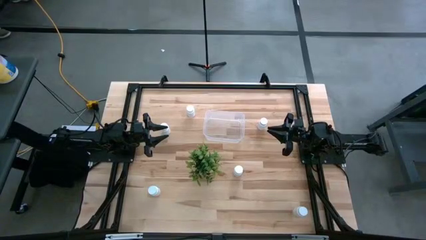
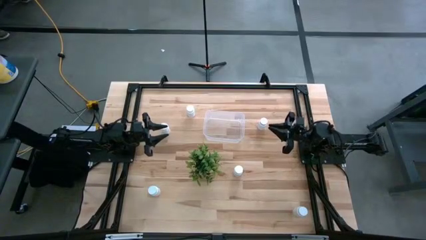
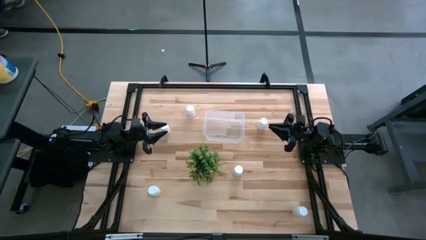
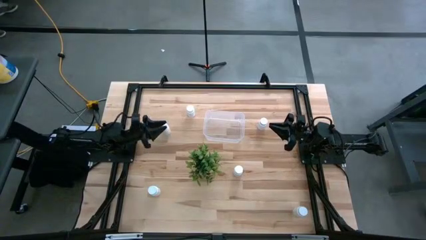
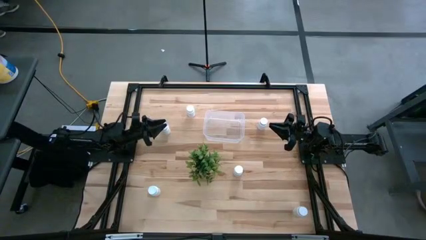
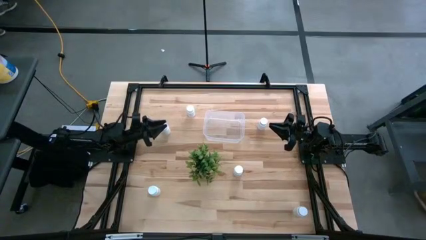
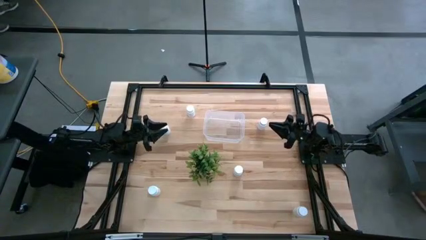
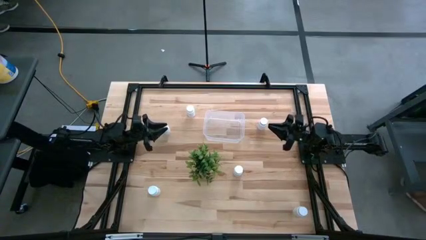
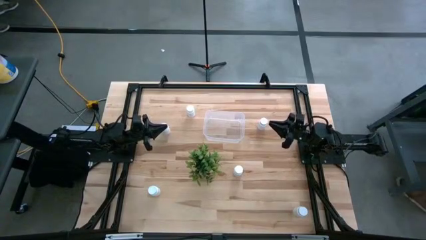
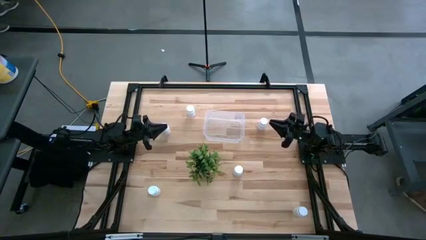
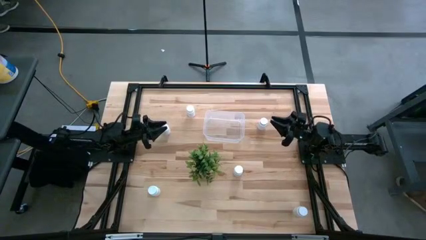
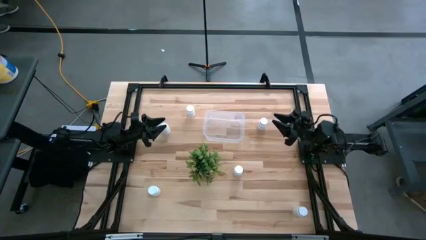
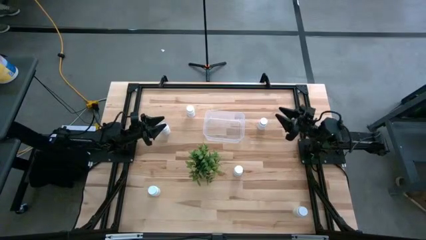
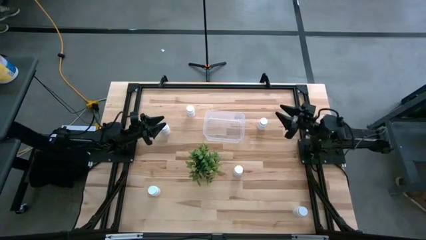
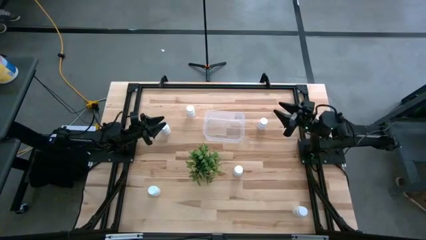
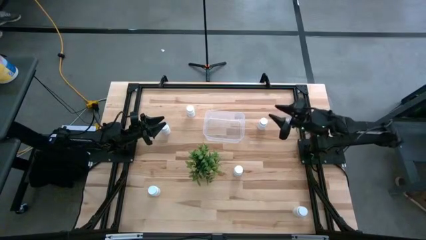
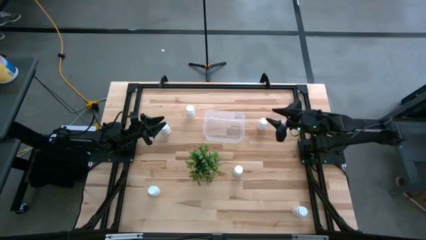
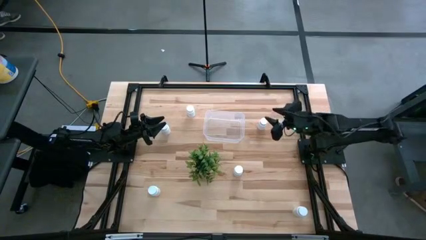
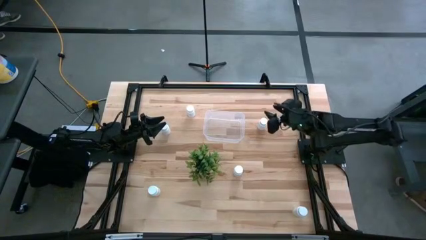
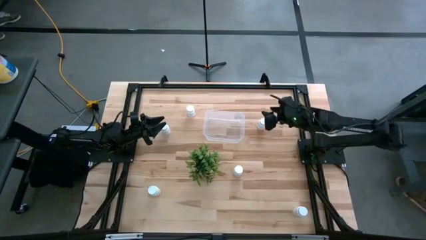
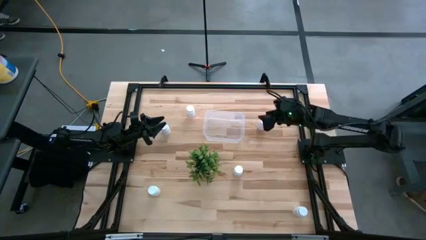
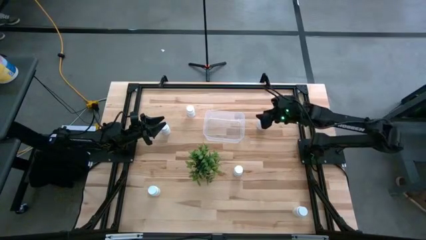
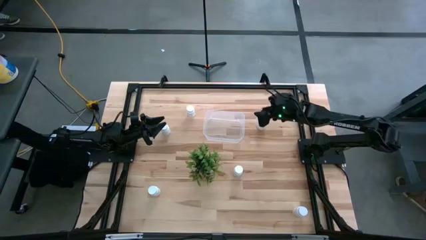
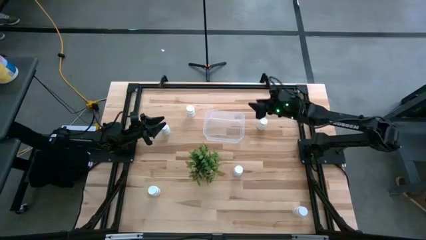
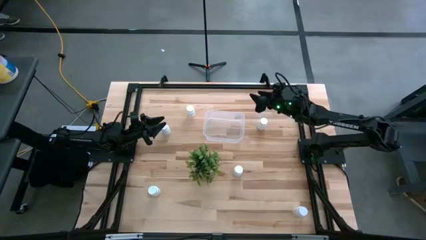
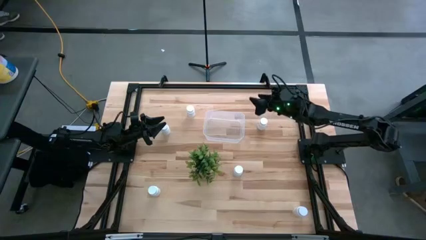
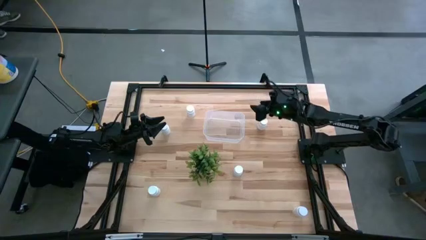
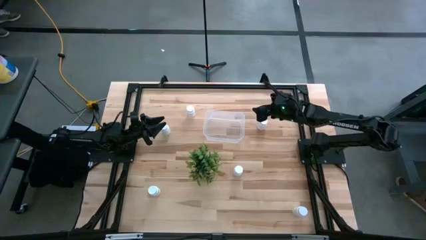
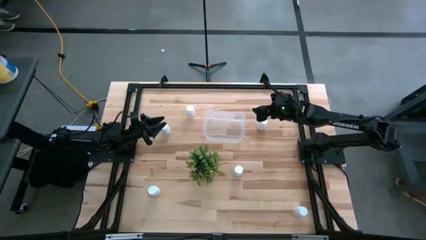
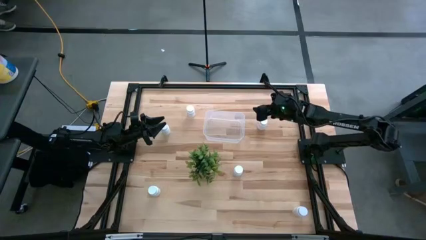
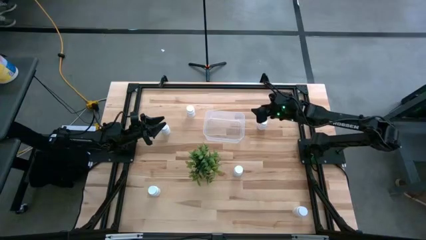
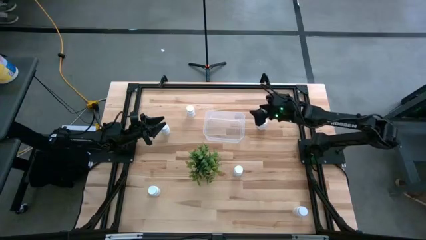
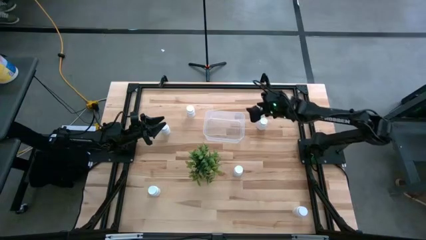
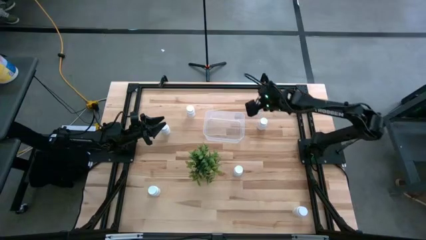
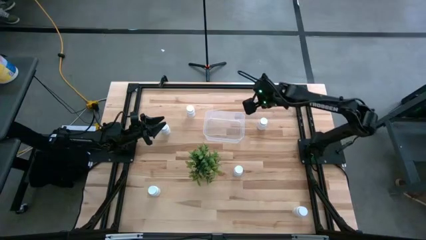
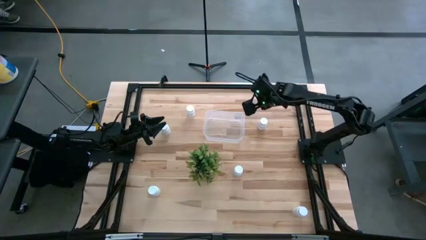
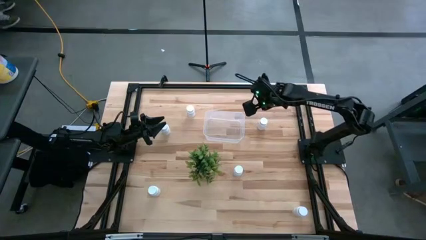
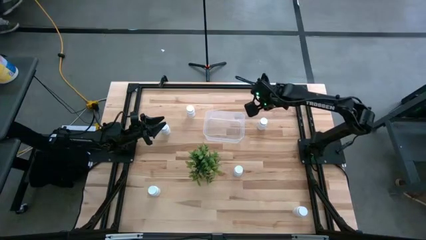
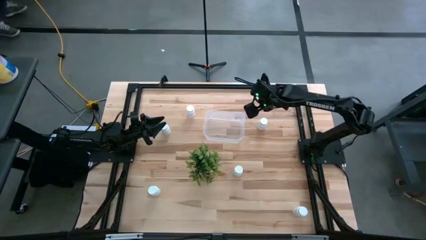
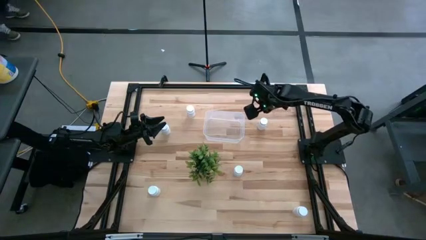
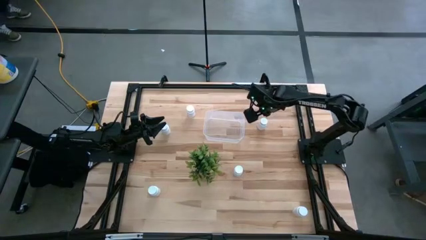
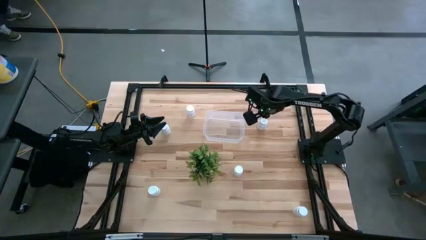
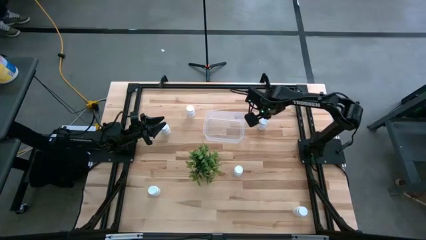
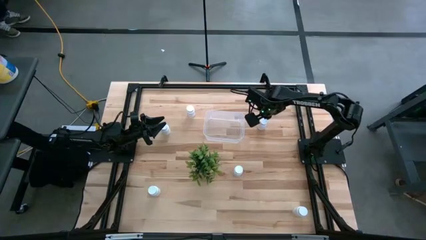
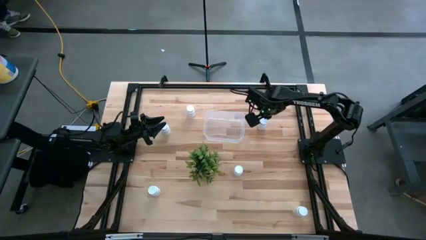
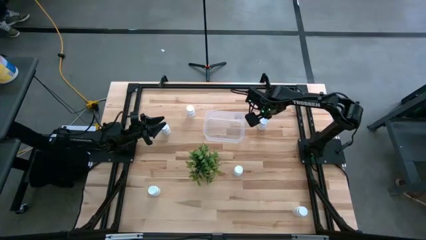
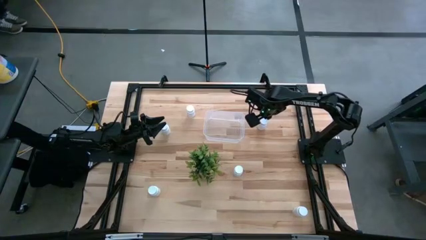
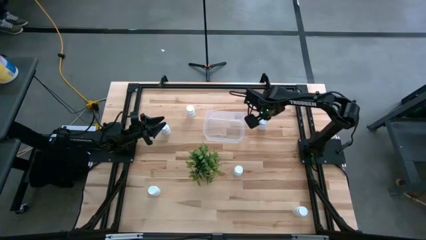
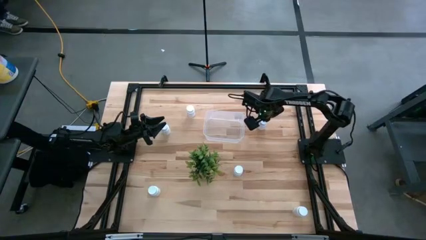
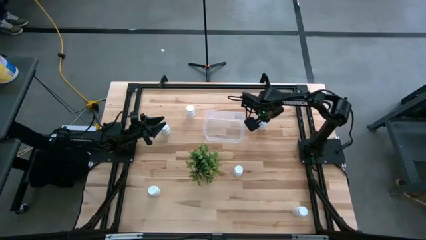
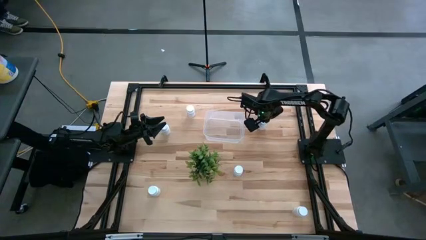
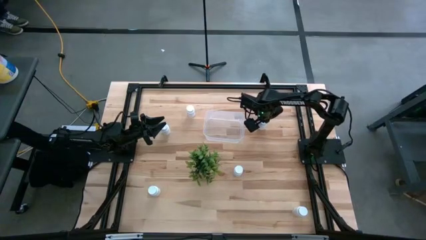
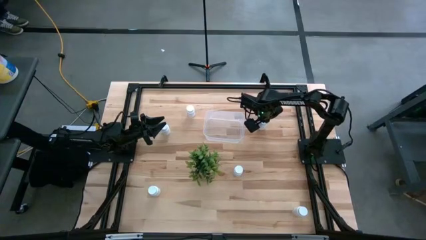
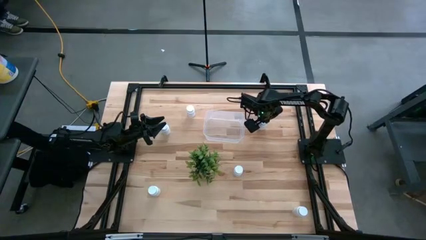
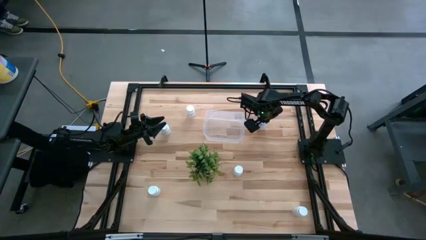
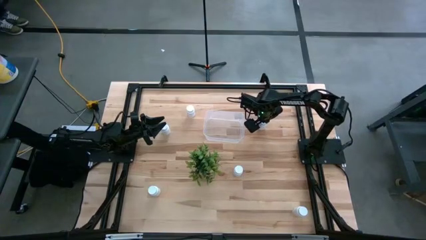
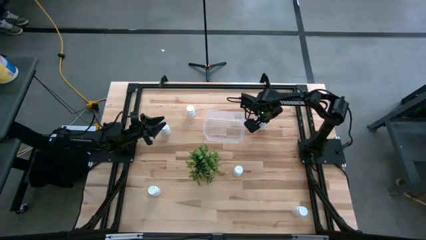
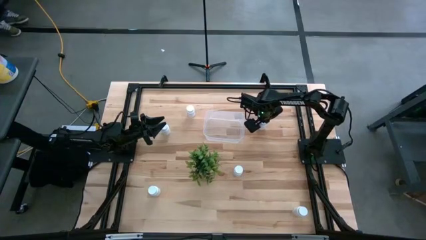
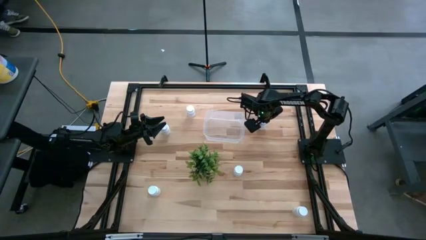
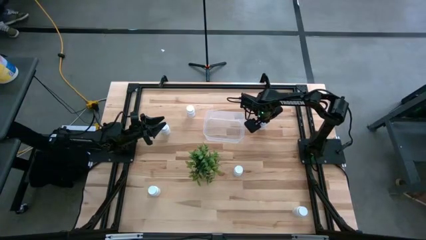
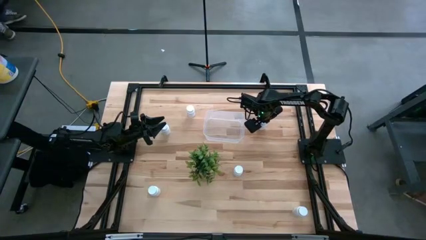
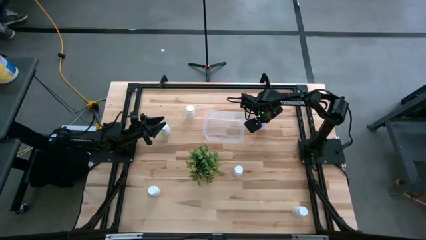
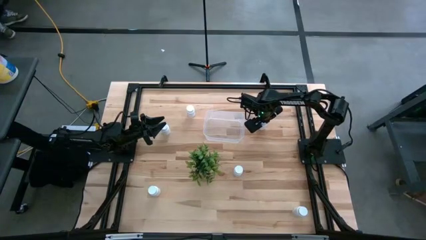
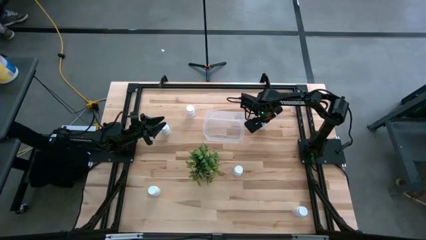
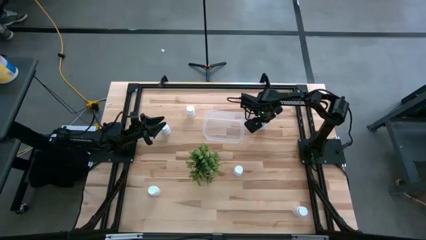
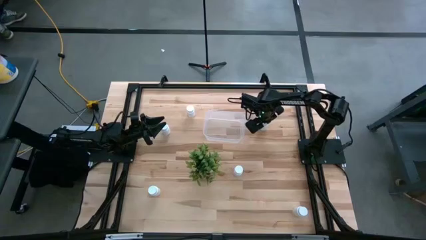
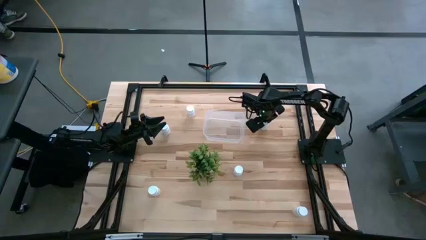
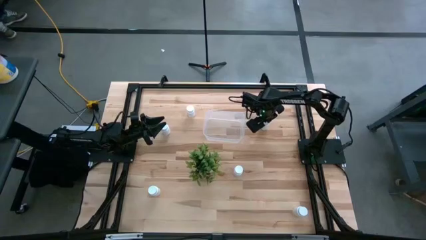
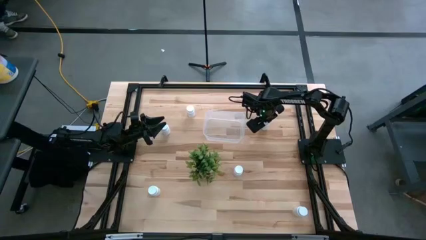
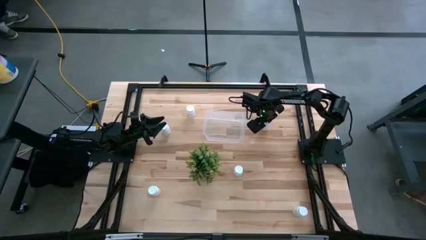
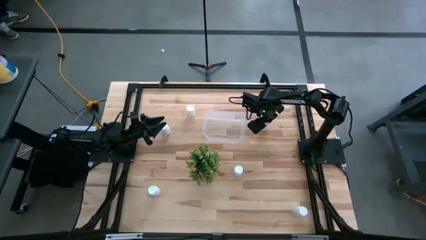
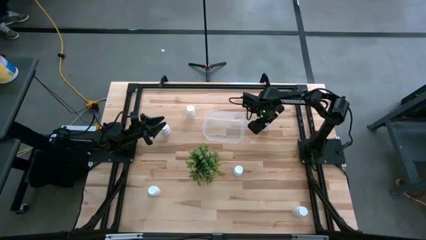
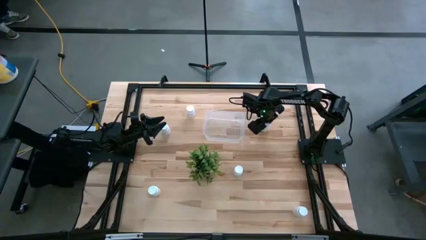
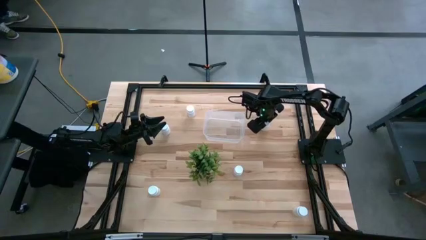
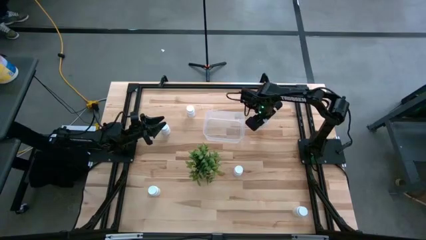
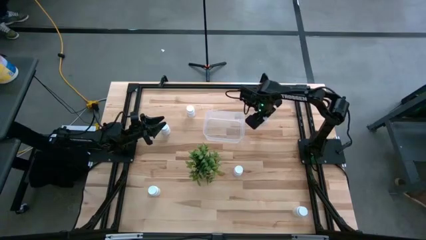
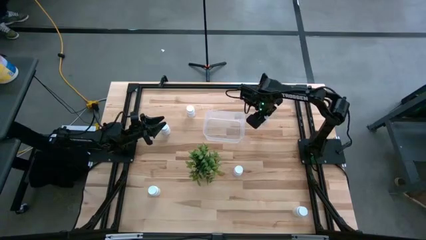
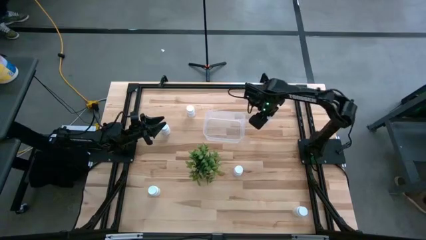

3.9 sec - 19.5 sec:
Task: Pick and place pill bottles into a basket
Put the white pill bottle in the transparent bin
